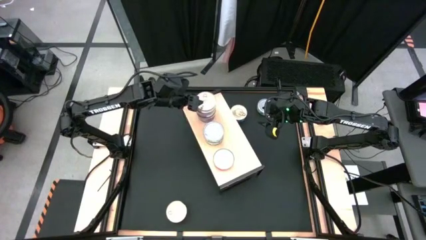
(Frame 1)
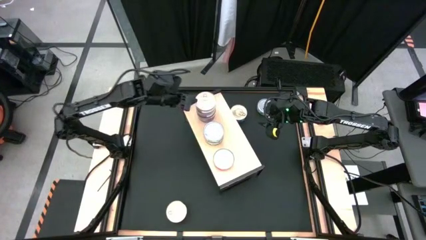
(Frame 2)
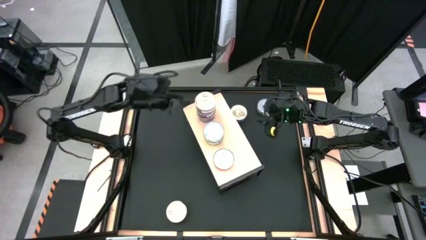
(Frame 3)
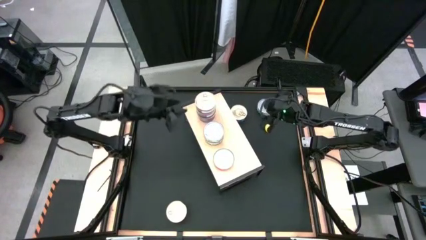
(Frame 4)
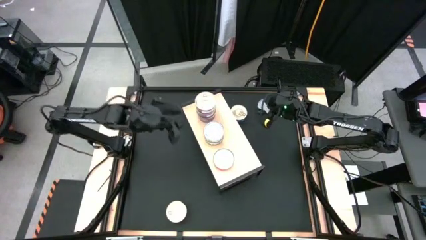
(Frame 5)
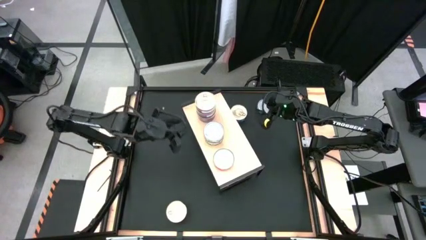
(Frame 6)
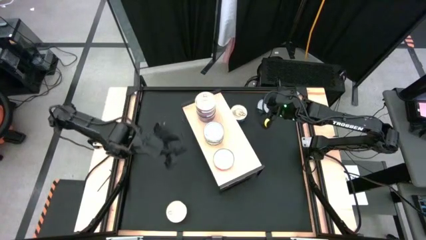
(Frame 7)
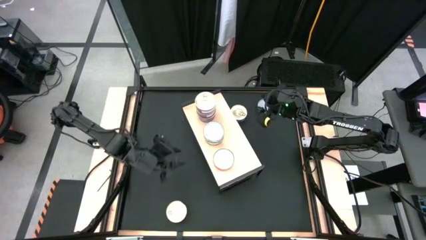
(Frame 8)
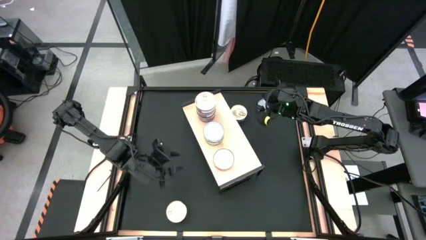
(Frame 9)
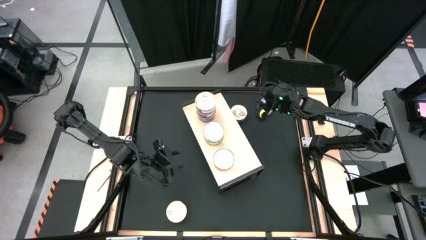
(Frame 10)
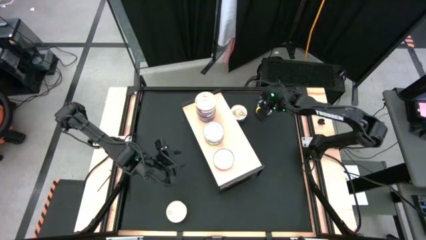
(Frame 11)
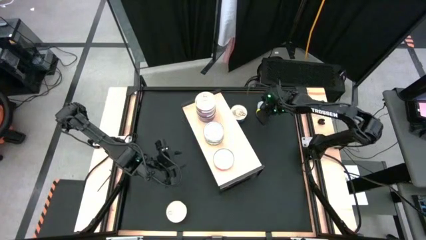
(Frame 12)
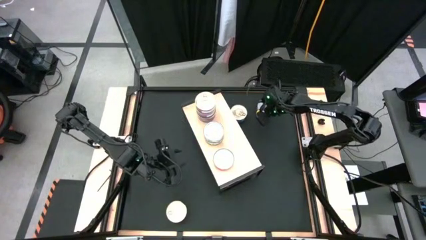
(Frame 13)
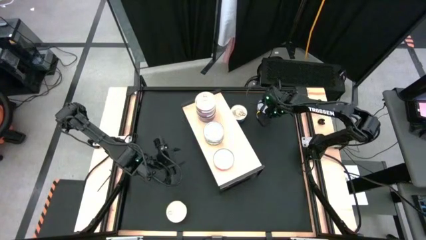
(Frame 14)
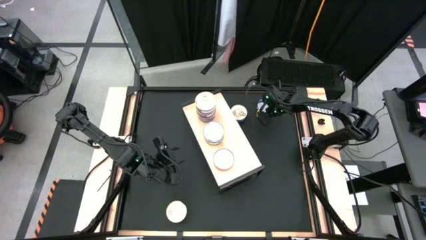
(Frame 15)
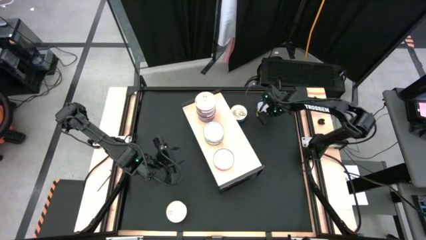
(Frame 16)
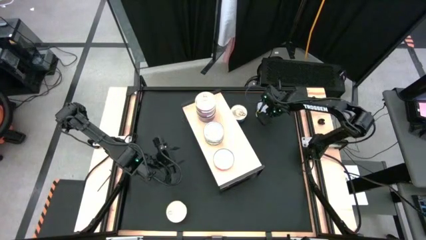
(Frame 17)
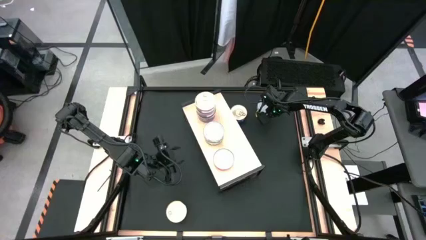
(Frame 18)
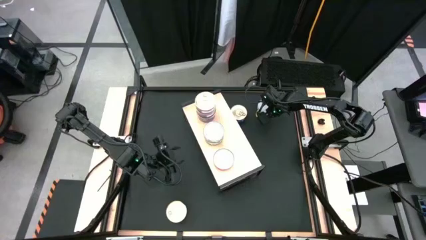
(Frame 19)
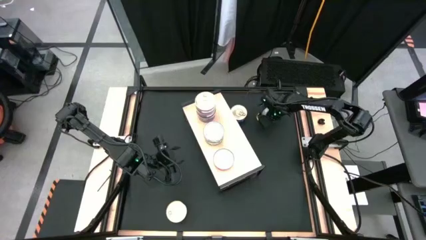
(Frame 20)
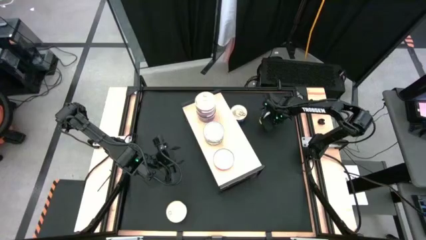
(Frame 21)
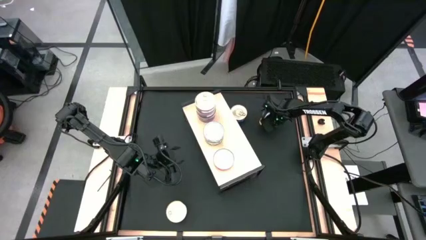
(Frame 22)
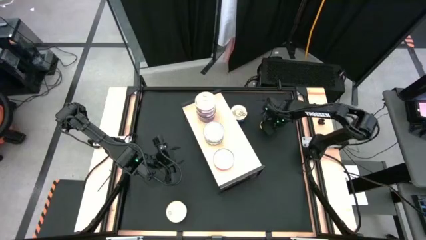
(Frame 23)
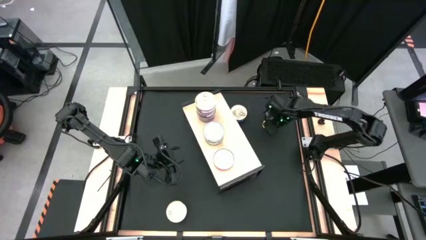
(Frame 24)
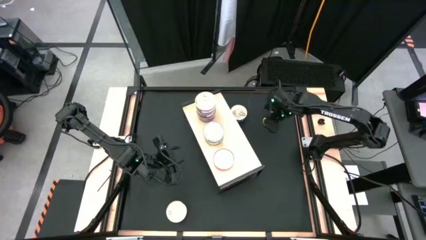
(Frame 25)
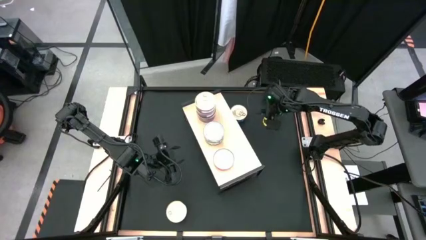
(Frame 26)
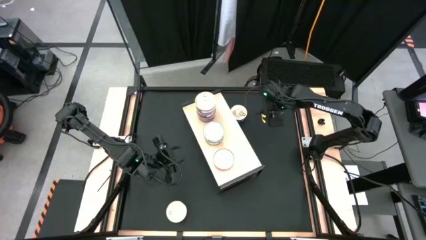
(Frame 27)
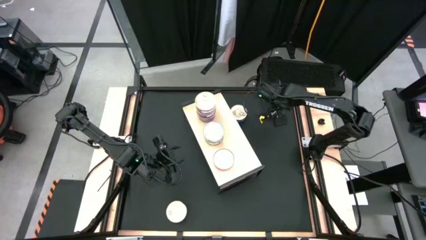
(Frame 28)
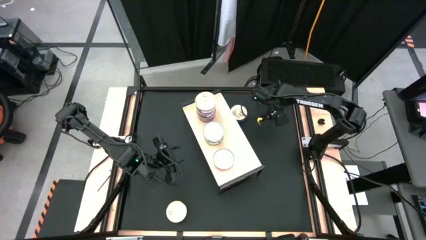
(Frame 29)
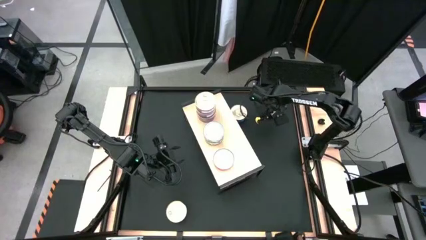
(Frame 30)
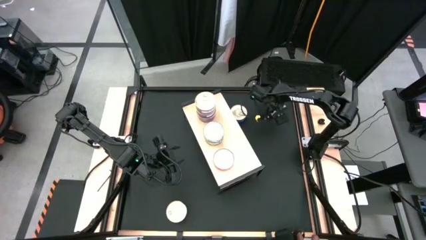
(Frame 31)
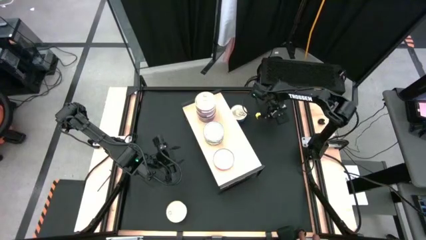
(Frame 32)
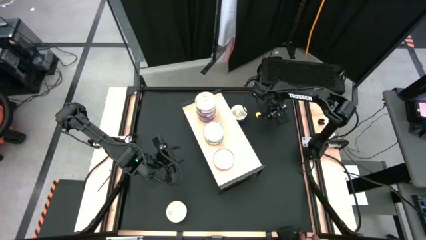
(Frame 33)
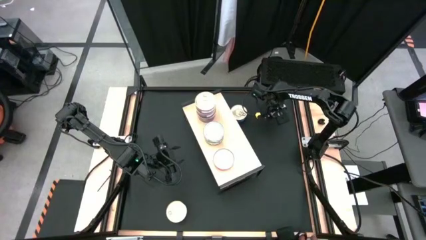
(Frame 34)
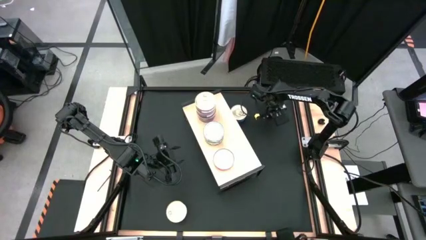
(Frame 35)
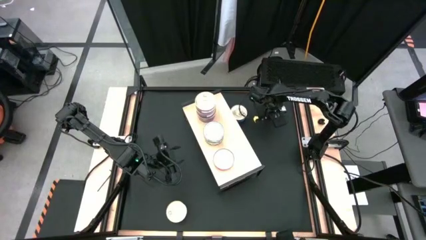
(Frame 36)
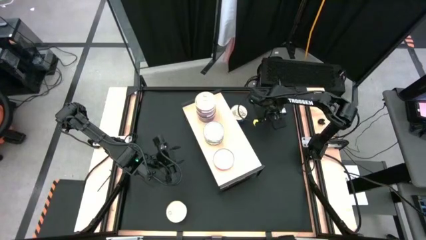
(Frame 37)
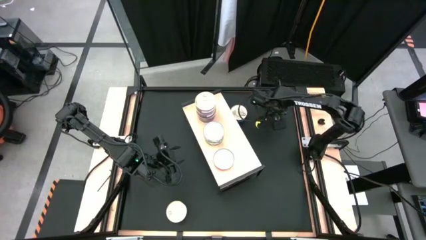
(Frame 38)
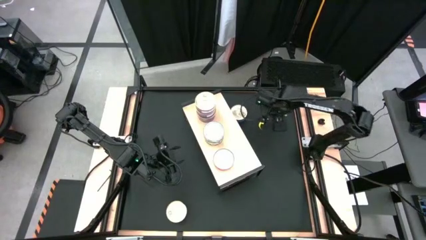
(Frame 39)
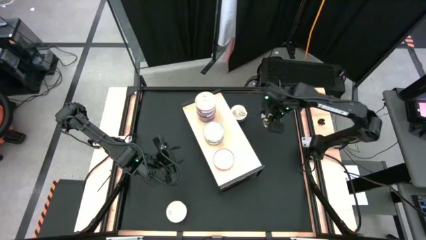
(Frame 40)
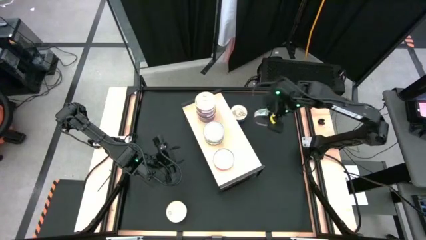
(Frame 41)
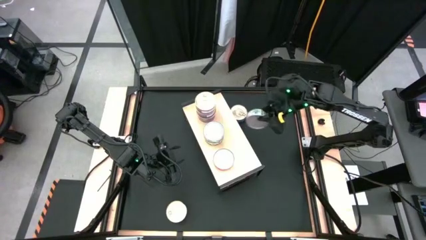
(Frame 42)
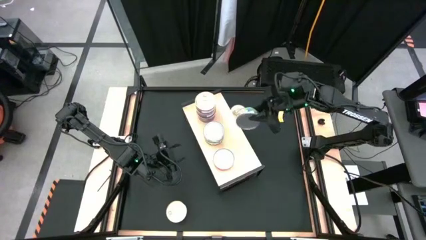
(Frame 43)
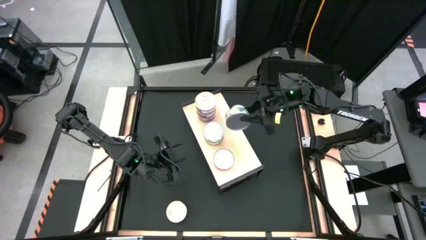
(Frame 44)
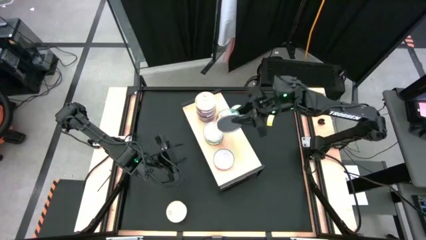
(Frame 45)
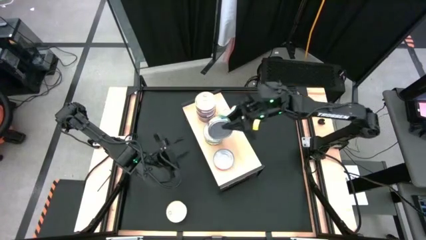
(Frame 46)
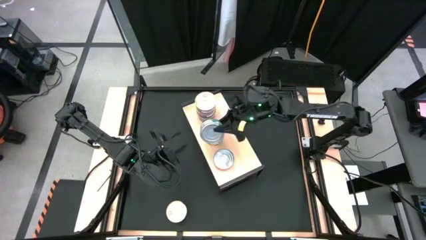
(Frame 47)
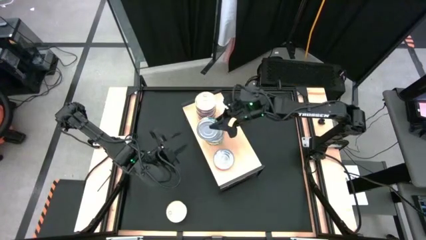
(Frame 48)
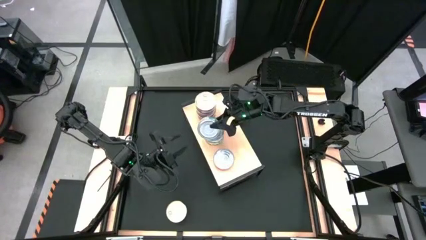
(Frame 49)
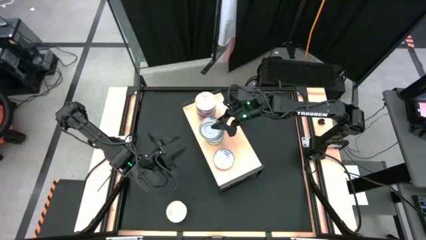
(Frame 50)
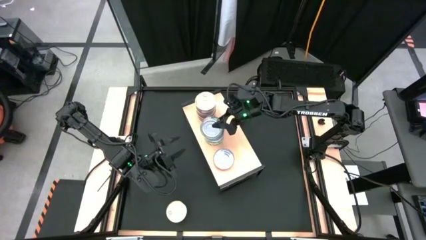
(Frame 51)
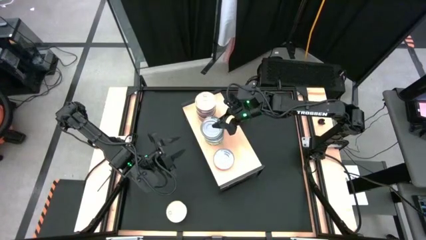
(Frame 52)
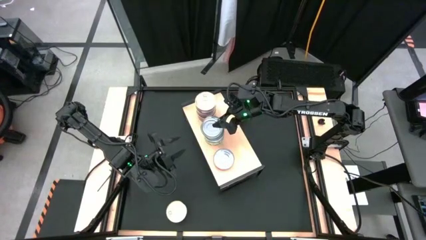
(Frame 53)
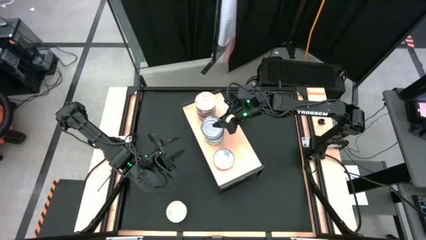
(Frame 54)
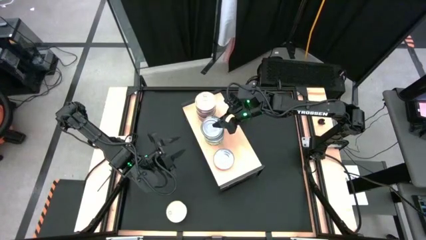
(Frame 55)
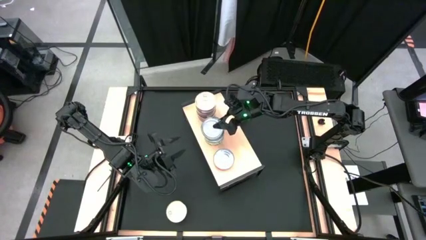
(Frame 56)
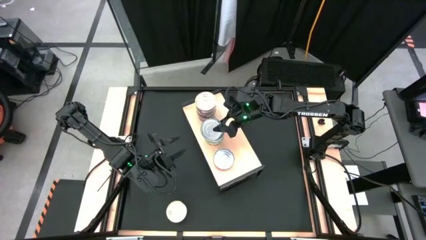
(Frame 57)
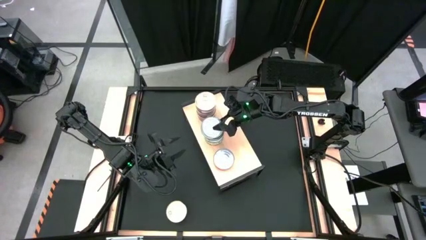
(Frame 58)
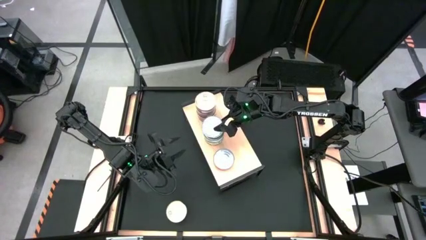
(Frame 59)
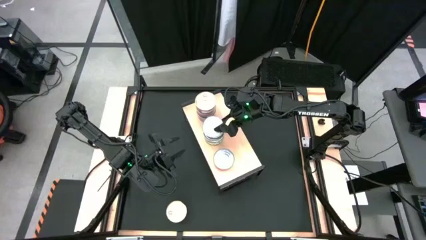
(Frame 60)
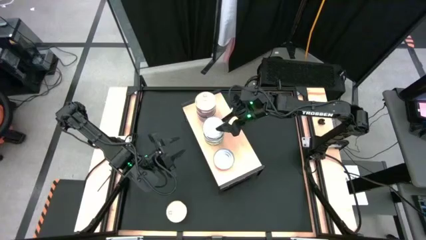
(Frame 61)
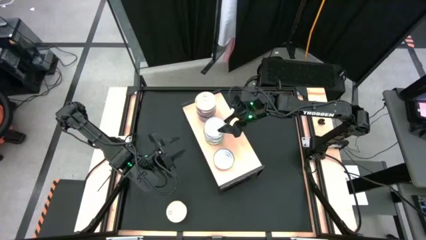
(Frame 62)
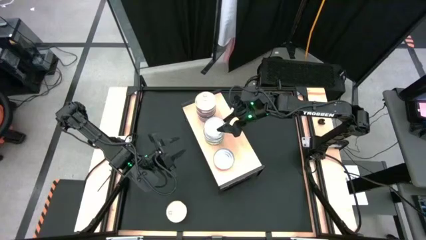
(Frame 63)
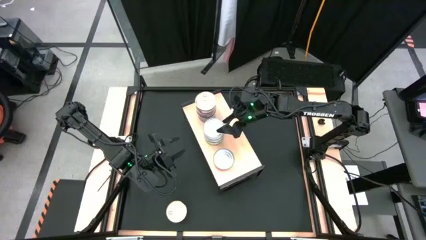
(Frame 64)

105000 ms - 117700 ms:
Task: Stack canned seafood by type on shelf
Stack the green tuna can on top of the green tuna cans on the shelf

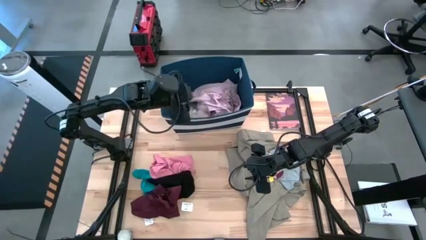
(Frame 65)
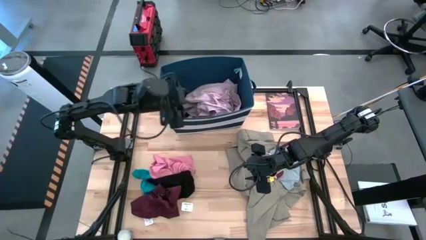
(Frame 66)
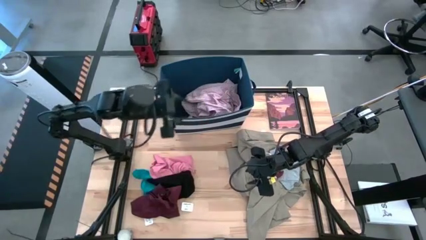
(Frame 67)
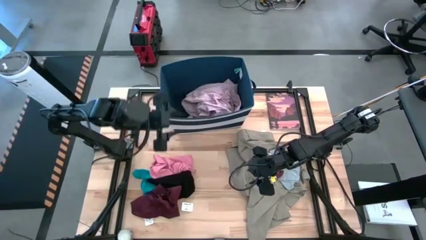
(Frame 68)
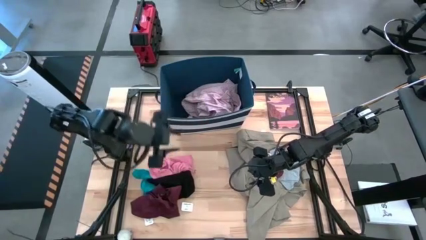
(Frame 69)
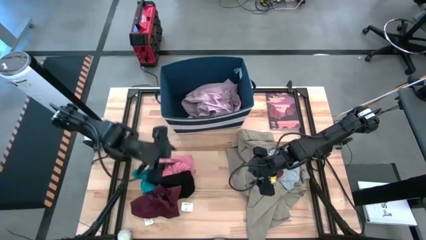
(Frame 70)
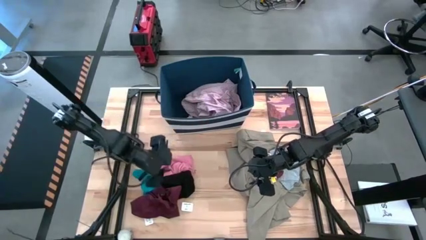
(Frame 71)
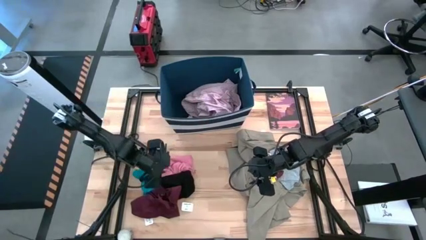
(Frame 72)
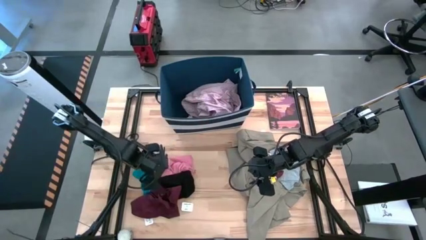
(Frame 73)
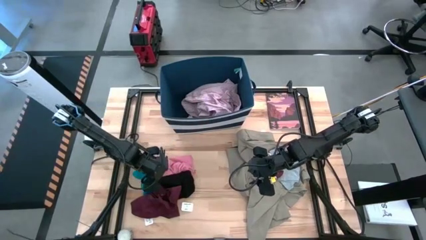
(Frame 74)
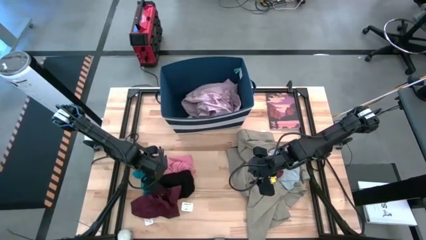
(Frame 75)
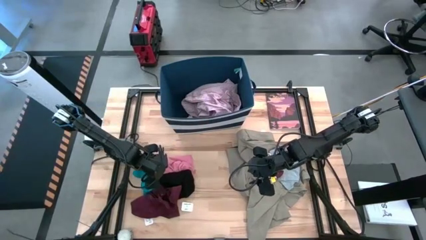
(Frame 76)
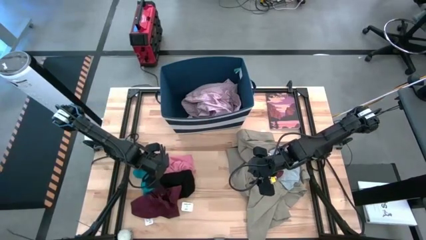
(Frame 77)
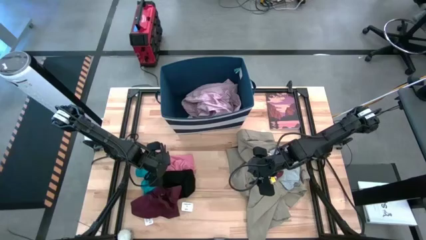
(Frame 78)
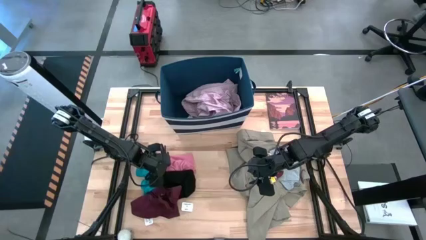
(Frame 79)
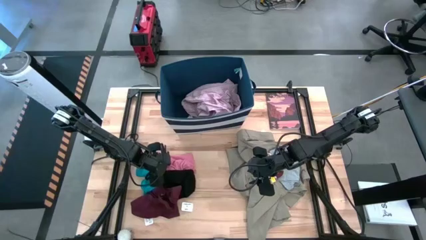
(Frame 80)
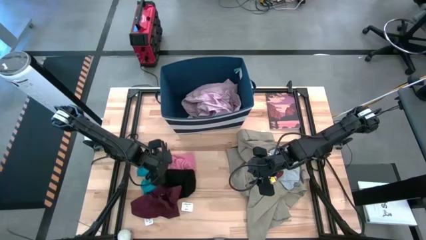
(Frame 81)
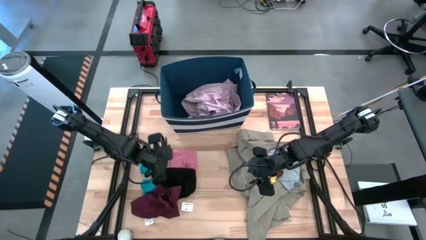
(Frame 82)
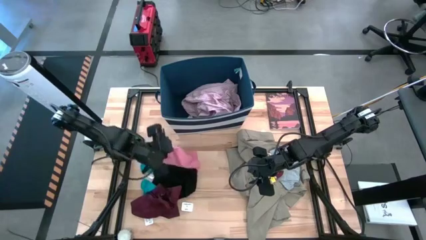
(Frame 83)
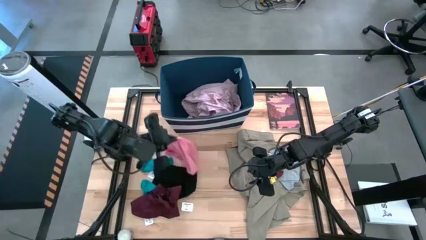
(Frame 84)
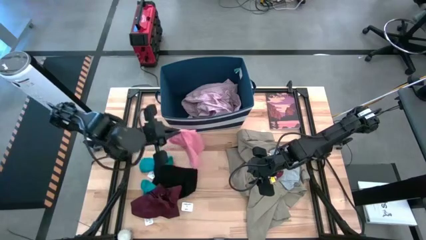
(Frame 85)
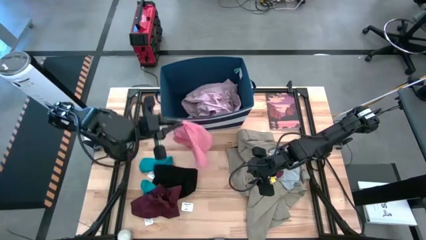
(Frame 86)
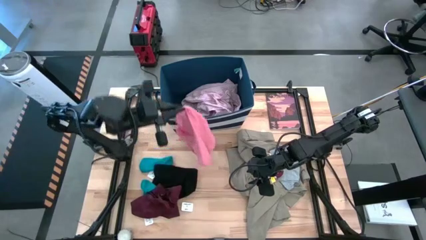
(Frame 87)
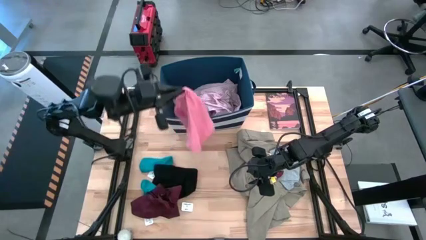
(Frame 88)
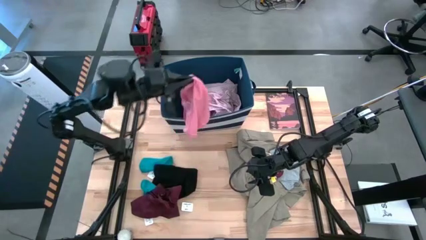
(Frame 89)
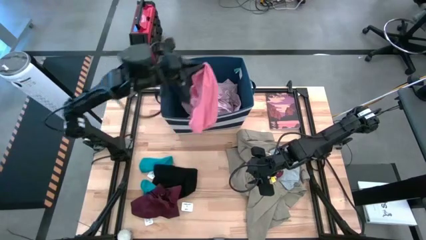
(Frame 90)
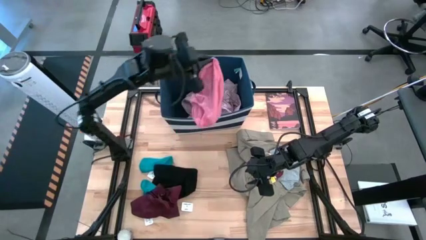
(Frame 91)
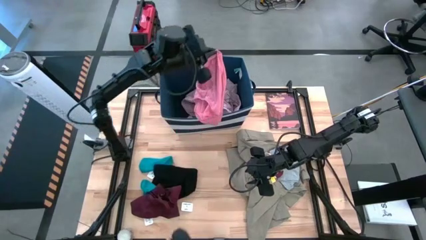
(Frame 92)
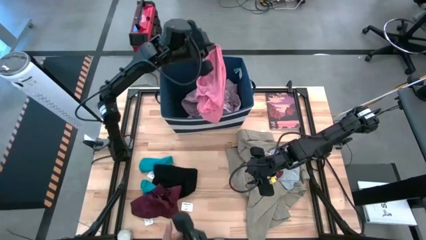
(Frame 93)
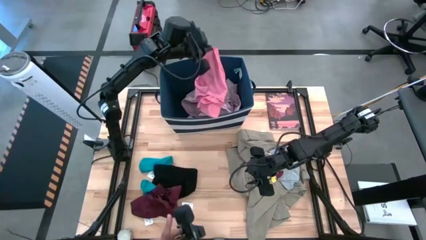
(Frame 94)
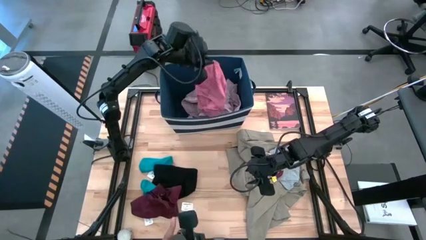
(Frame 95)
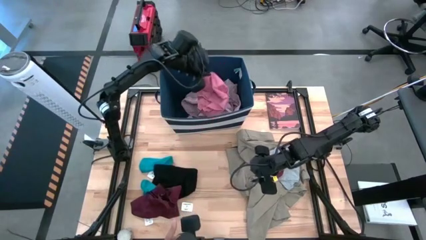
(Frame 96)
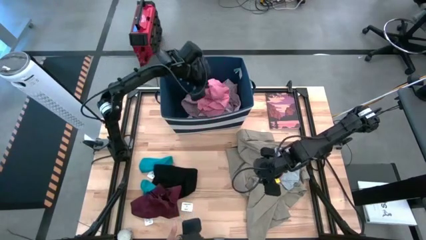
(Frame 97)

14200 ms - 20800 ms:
Task: Sort clothes
Put the pink underwear into the blue laundry bin
